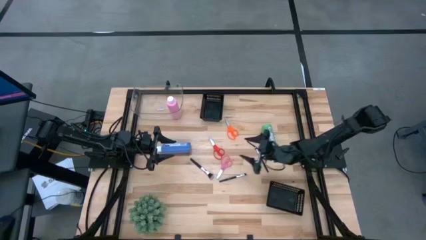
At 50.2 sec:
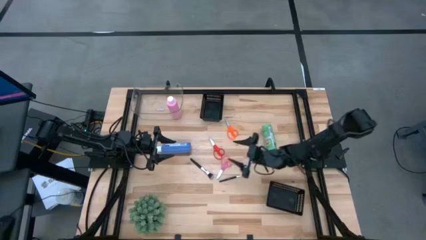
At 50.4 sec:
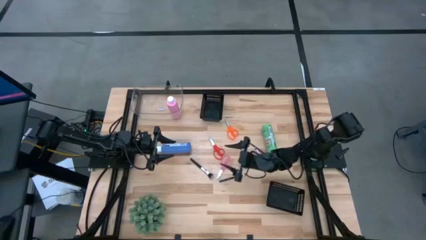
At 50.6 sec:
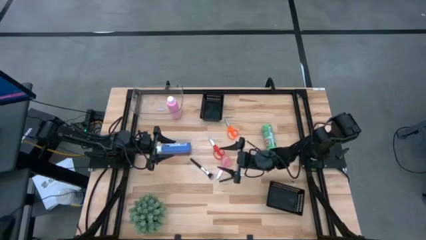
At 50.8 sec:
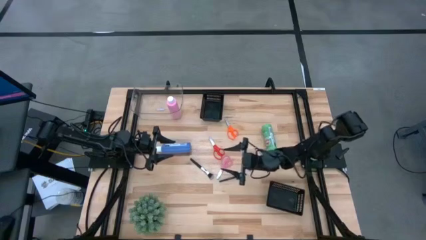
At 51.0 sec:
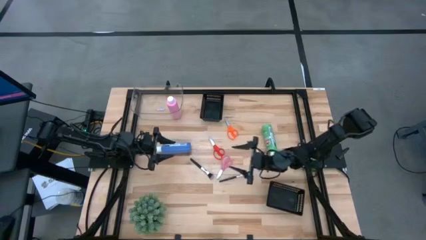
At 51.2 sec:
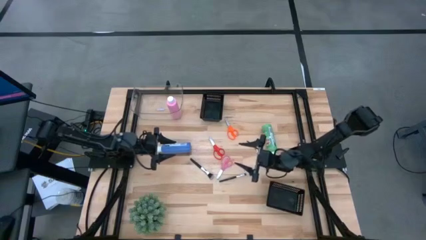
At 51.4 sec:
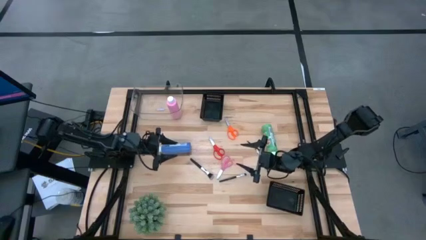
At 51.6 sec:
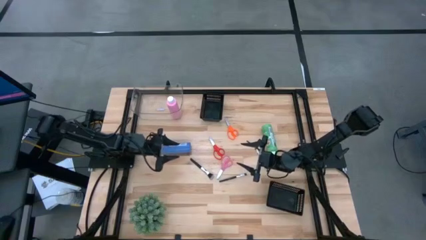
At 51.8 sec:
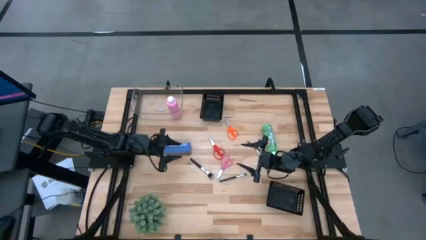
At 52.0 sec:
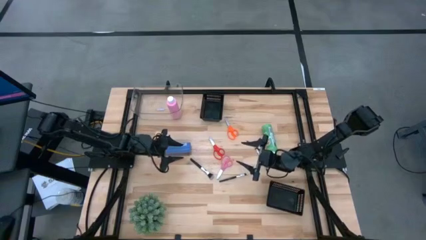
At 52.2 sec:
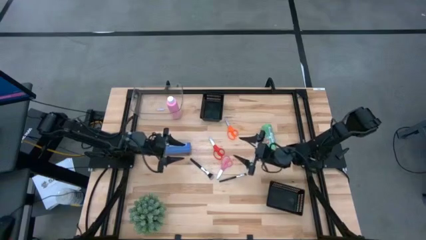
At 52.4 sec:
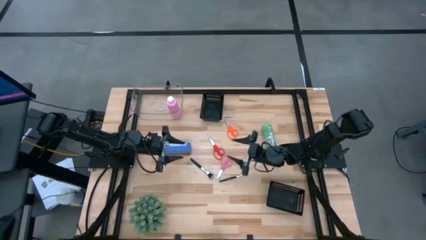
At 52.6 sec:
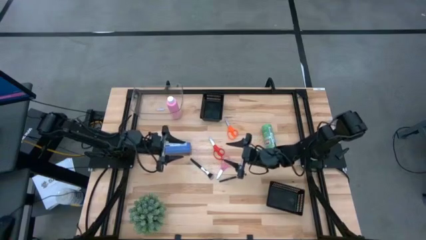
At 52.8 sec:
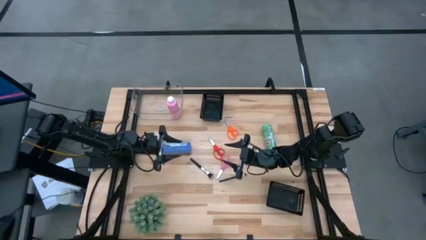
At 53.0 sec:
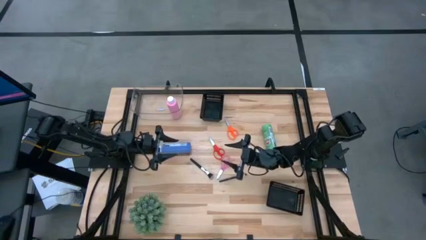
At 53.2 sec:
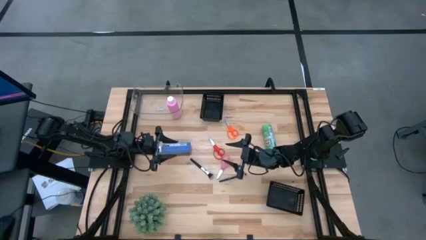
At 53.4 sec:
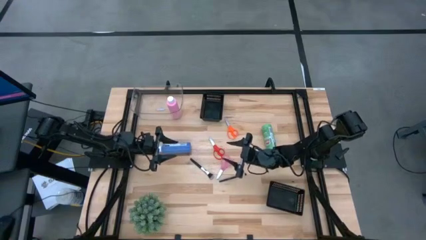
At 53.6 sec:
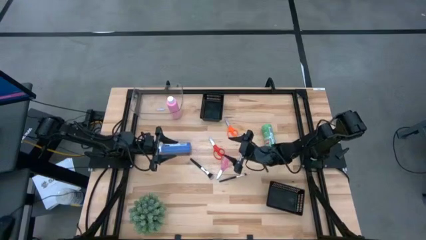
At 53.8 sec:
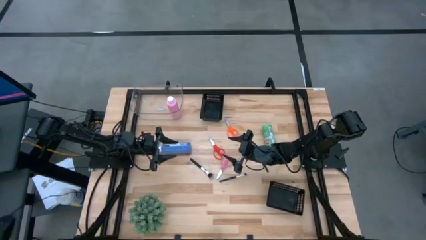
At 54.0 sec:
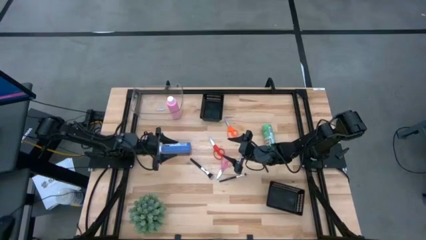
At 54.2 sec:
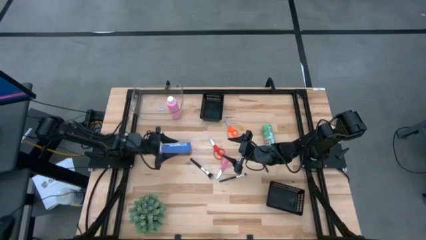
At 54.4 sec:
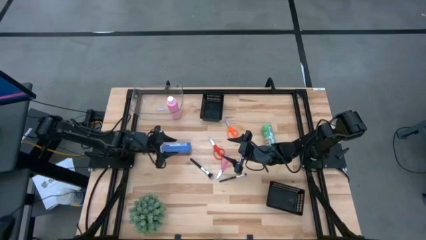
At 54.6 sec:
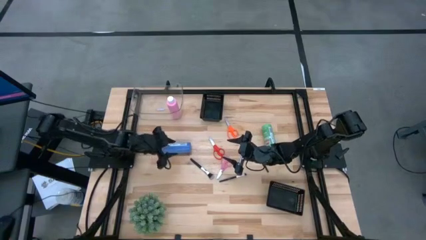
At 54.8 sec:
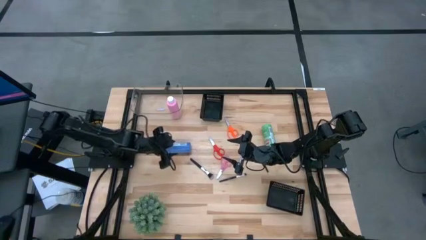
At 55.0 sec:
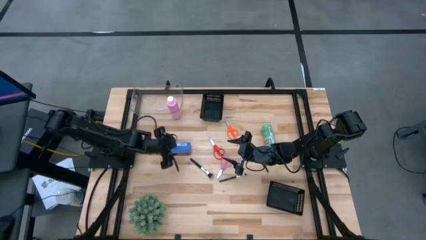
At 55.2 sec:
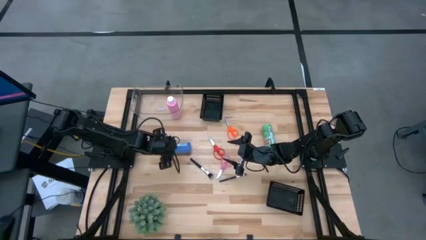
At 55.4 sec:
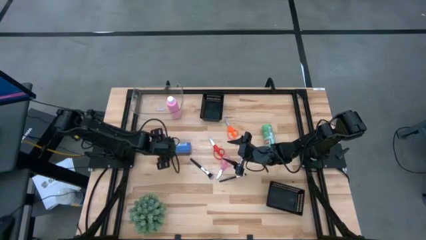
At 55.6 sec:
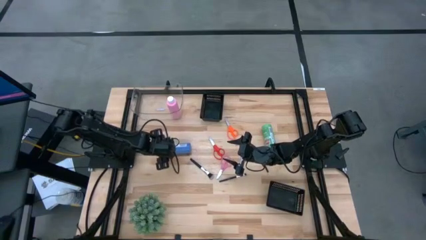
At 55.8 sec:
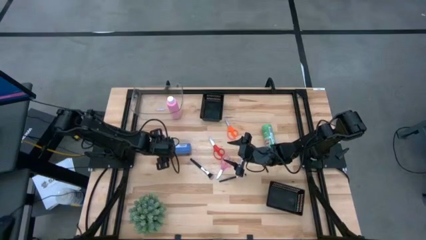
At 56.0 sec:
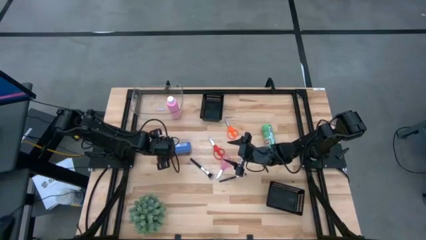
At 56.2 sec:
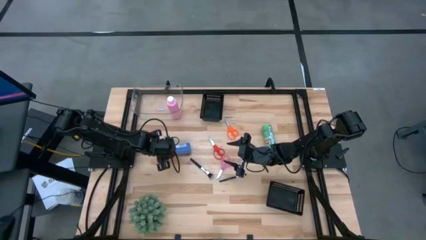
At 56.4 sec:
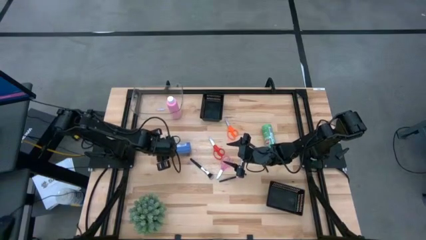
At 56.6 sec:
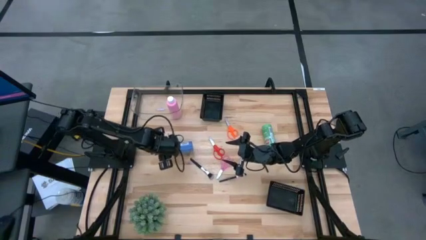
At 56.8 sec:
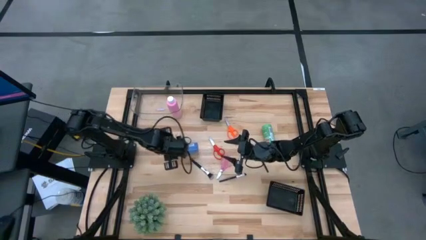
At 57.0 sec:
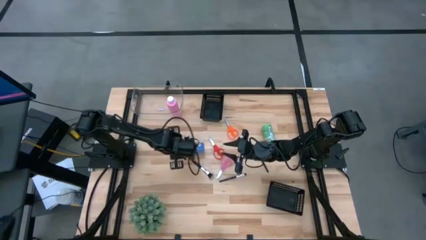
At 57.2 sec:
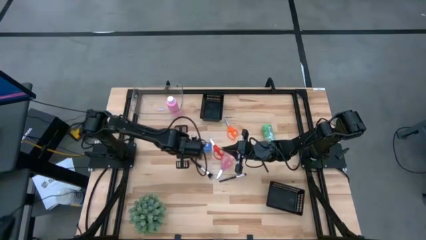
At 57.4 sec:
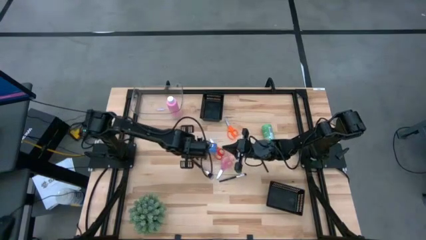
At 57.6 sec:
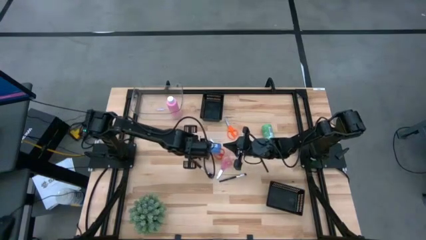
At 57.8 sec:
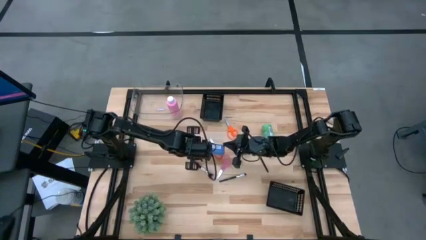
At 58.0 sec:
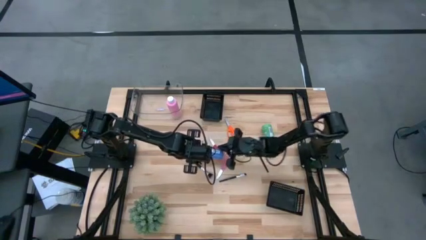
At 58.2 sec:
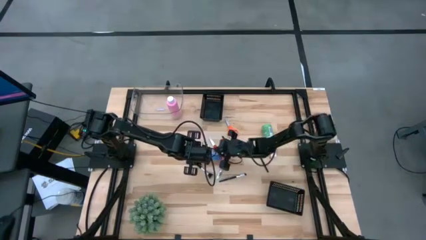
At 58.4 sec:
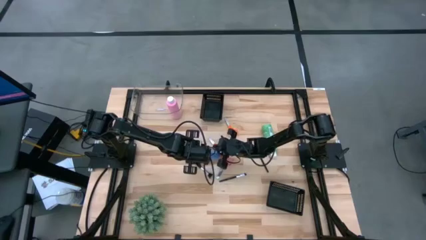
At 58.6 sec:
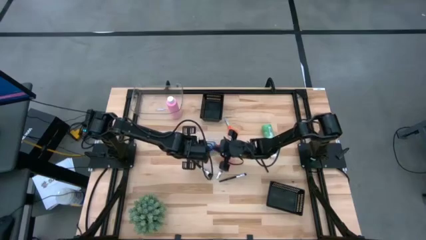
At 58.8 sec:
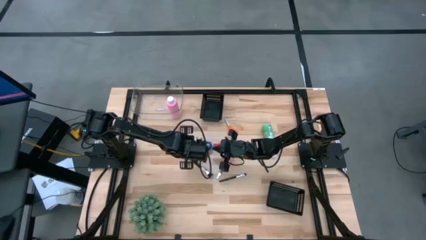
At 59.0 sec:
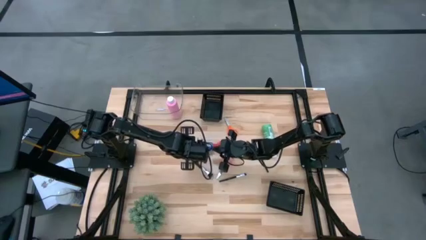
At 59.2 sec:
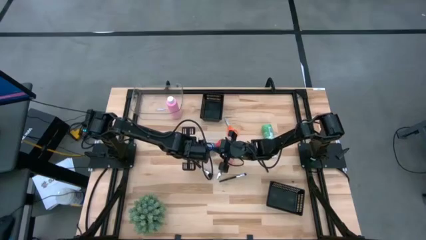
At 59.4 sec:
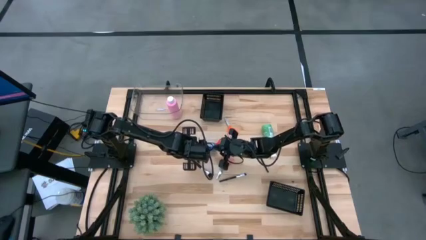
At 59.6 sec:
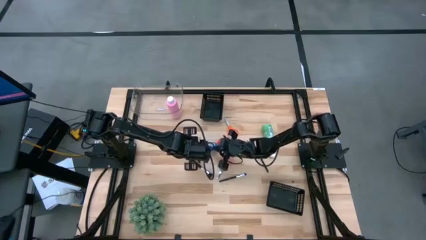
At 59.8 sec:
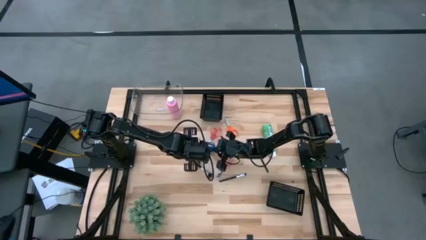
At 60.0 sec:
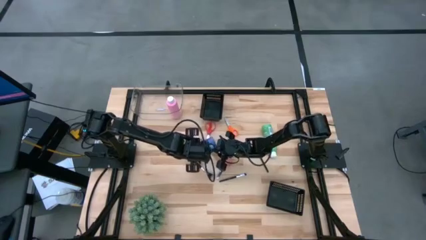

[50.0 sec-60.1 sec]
Task: Pick & Place Paint Supplies
Put the purple paint bottle into the transparent bin

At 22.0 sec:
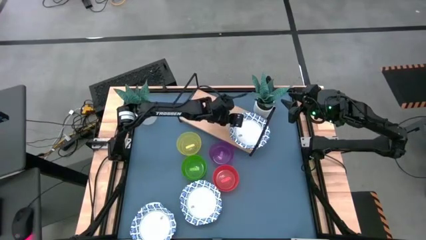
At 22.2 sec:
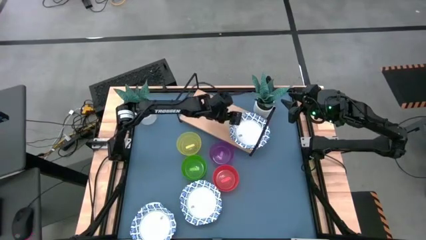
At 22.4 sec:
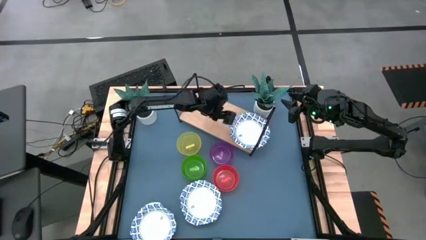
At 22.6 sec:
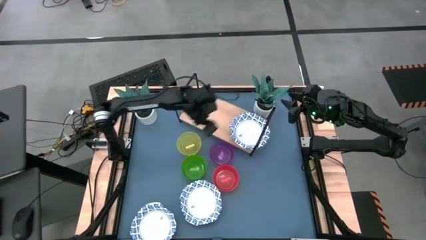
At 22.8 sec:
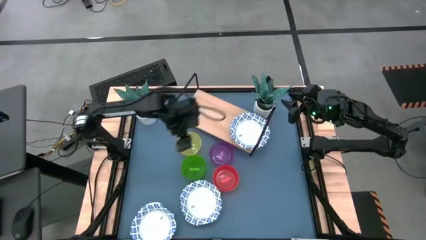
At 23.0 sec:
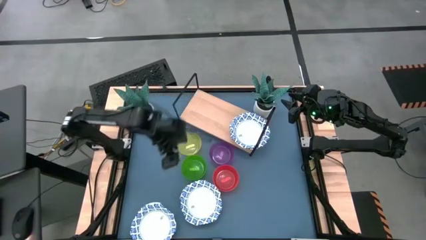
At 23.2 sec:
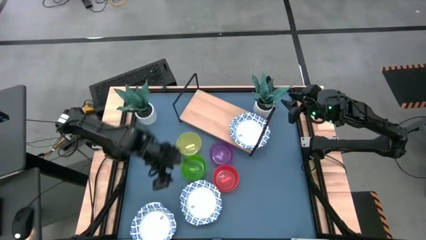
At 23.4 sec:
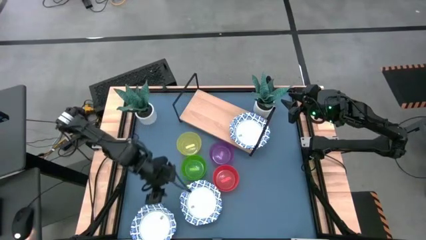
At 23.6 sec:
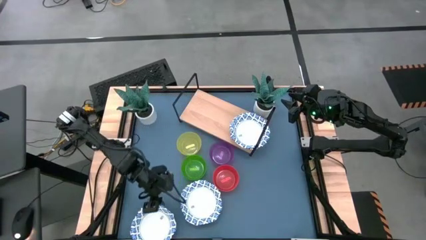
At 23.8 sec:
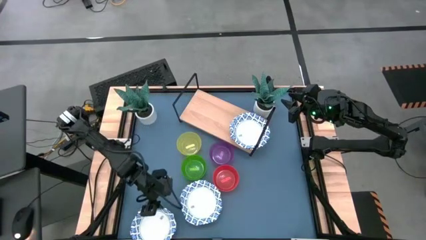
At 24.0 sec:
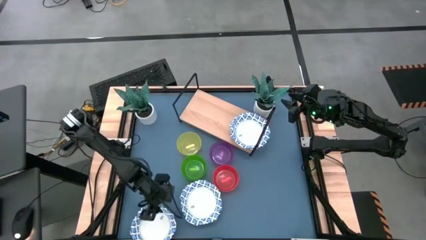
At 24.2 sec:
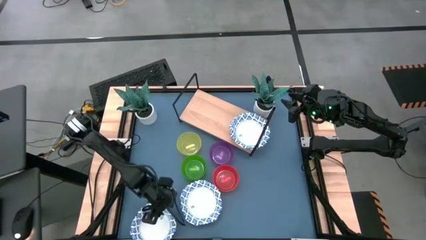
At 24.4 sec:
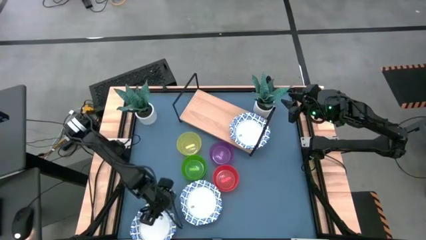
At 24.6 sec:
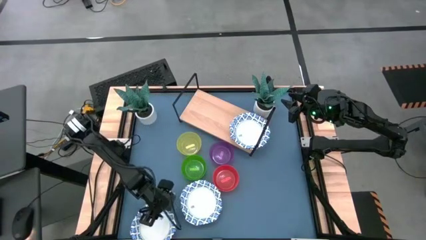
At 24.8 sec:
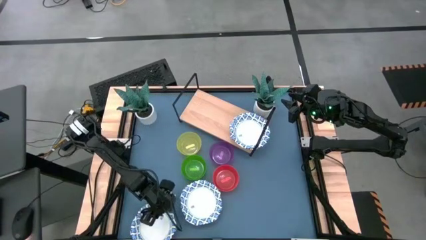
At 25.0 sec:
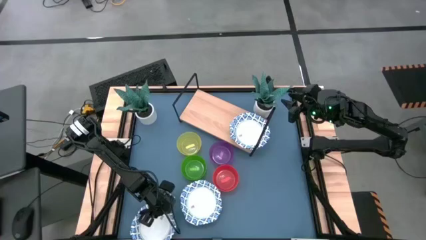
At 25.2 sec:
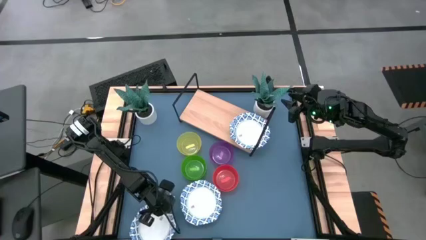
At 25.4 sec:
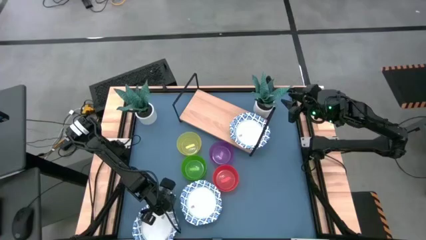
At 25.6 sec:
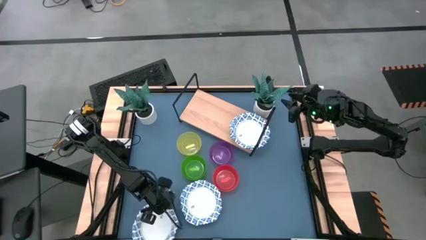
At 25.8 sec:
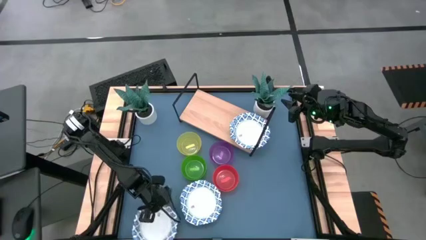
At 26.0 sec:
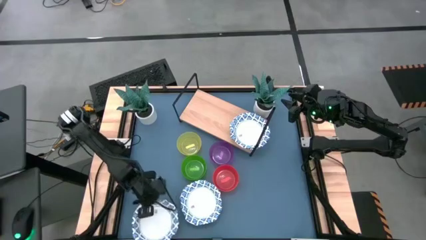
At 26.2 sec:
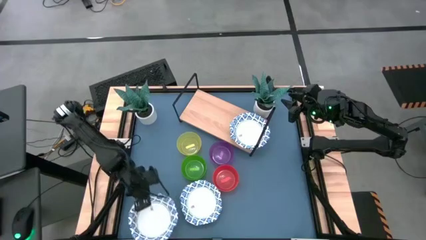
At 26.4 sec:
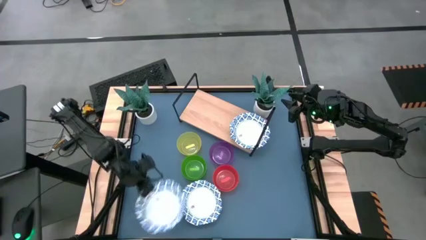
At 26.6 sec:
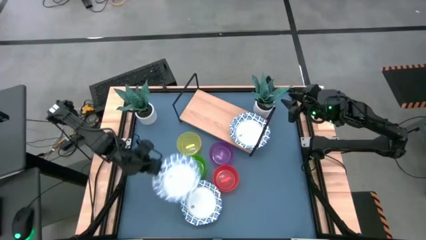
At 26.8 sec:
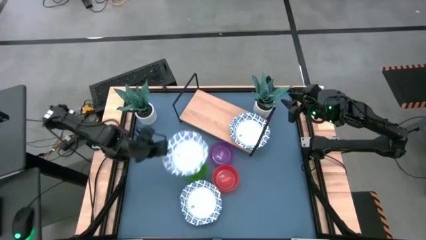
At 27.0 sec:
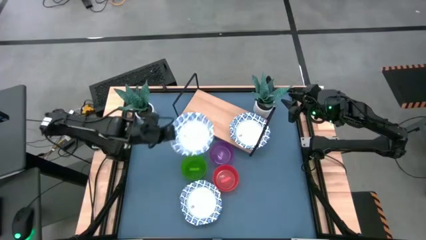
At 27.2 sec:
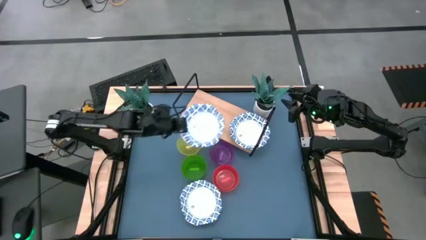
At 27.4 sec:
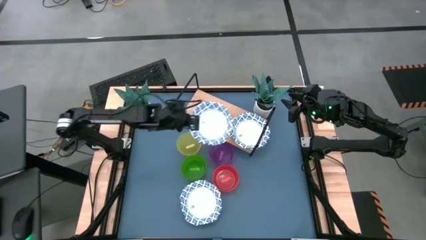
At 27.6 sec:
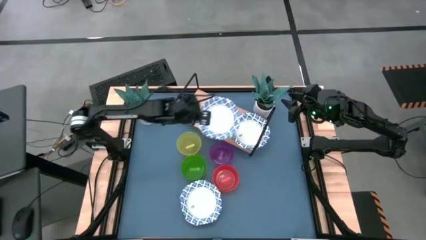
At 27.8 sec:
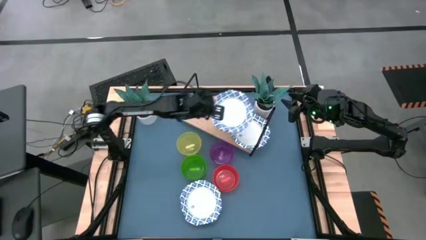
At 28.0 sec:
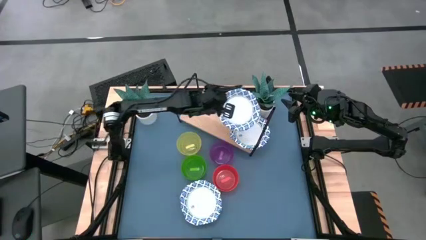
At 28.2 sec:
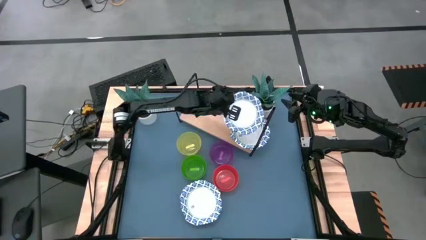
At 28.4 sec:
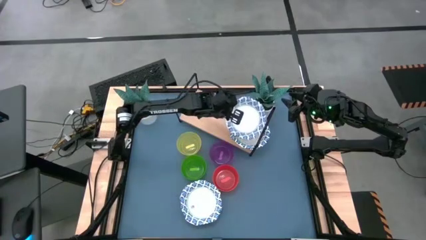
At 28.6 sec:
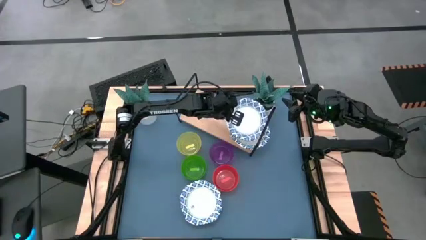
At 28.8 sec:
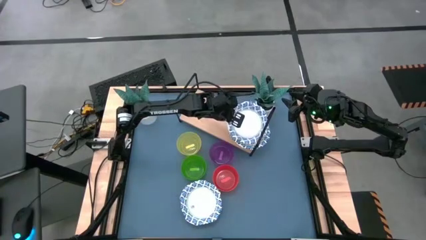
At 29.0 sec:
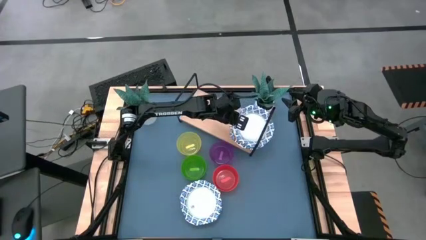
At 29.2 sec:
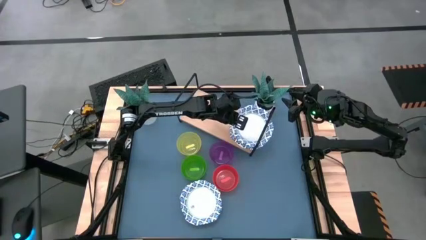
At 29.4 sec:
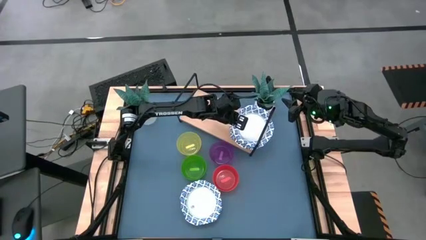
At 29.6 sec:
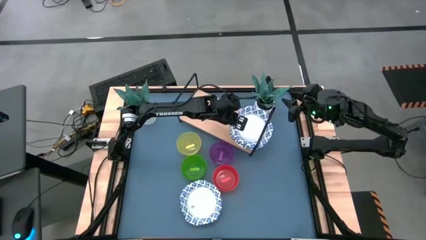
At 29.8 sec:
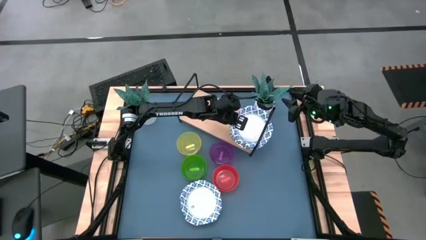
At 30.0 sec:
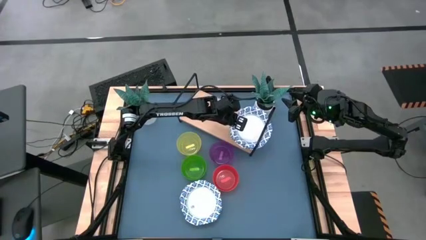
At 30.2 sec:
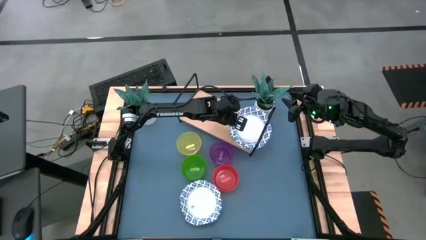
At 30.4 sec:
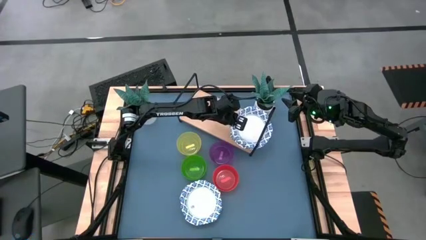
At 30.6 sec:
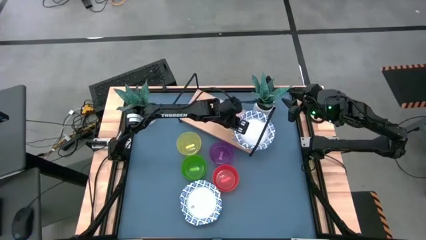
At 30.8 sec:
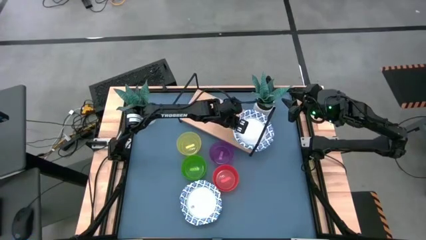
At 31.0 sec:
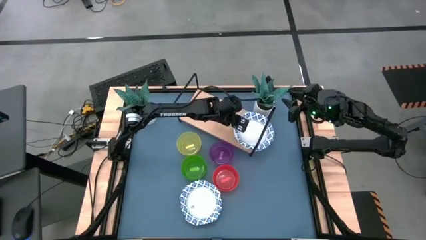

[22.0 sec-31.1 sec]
Task: Place and stack bowls onto a shelf
Stack blue pattern plate on top of the blue pattern plate on the shelf
